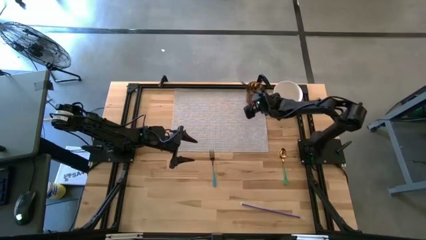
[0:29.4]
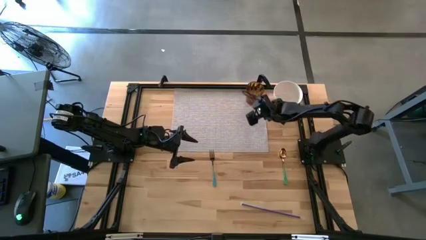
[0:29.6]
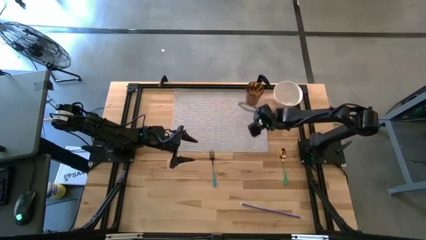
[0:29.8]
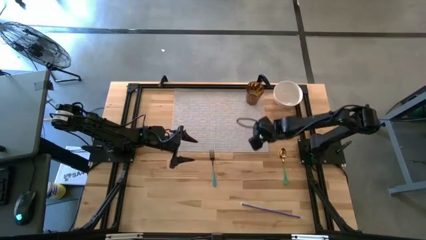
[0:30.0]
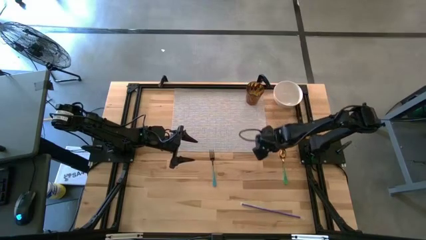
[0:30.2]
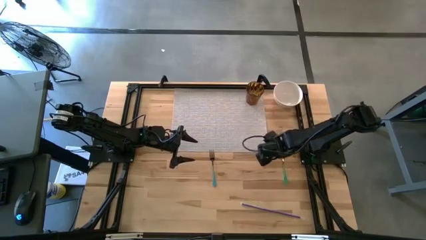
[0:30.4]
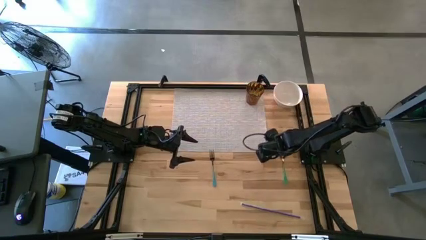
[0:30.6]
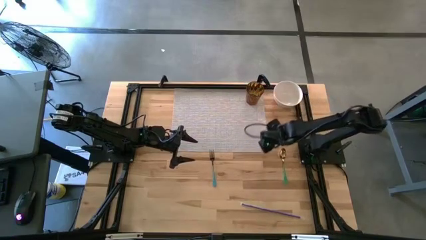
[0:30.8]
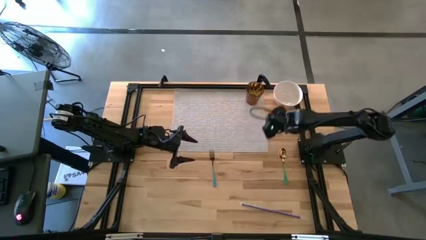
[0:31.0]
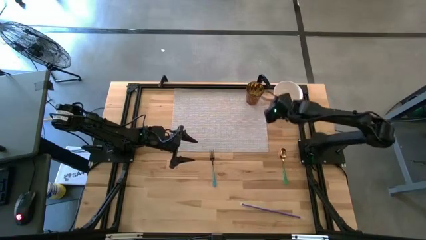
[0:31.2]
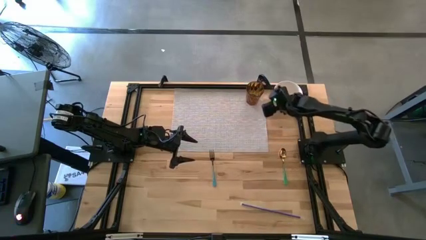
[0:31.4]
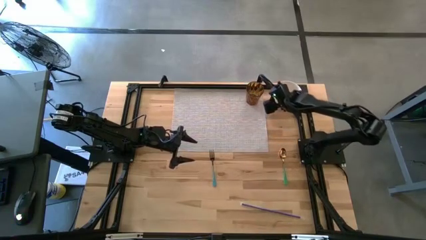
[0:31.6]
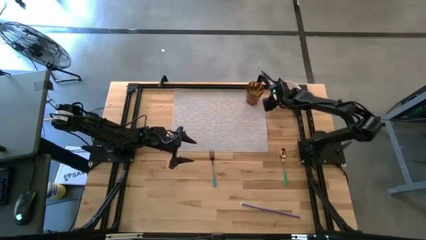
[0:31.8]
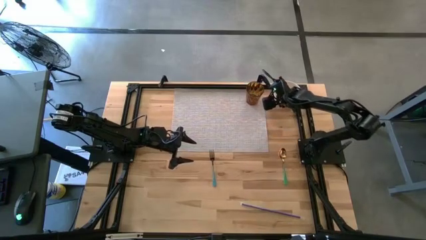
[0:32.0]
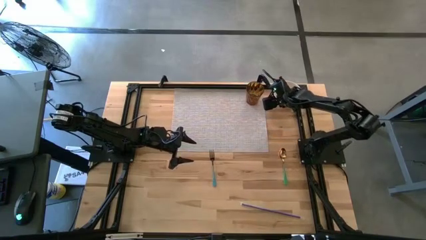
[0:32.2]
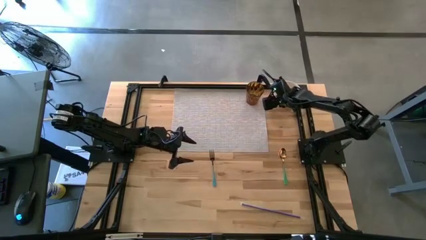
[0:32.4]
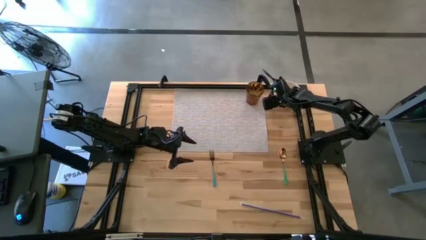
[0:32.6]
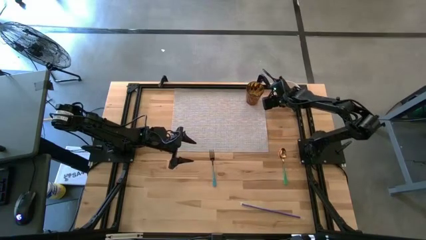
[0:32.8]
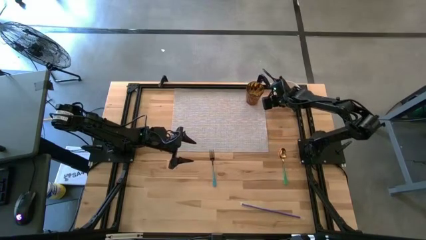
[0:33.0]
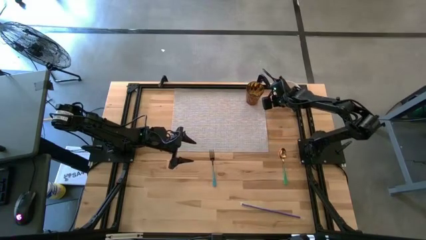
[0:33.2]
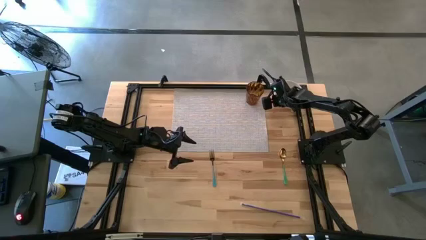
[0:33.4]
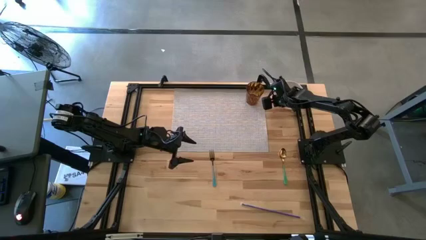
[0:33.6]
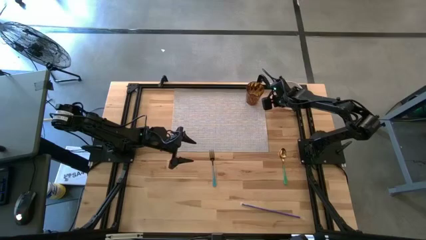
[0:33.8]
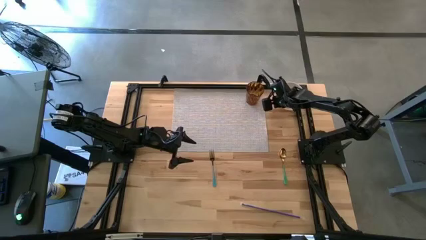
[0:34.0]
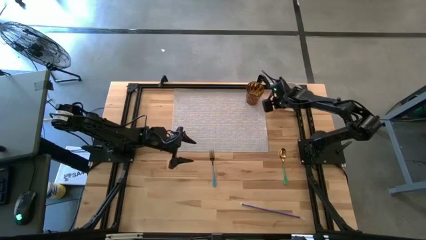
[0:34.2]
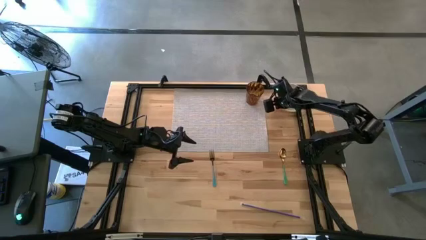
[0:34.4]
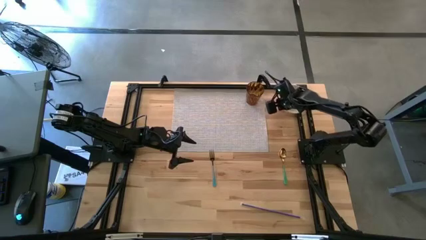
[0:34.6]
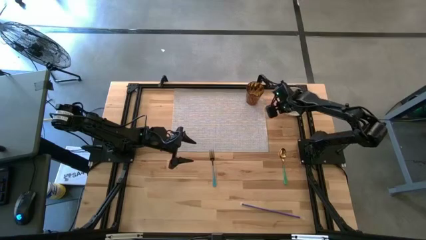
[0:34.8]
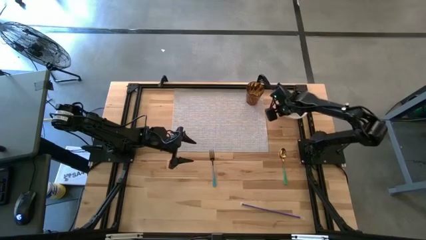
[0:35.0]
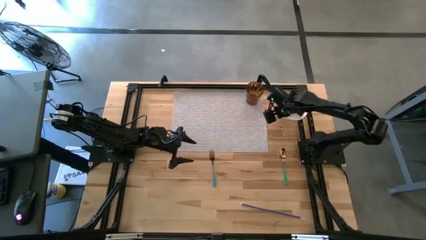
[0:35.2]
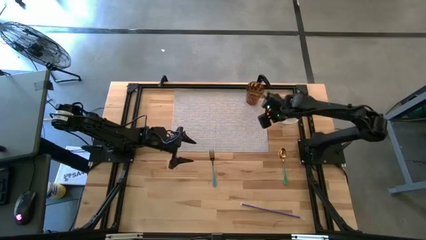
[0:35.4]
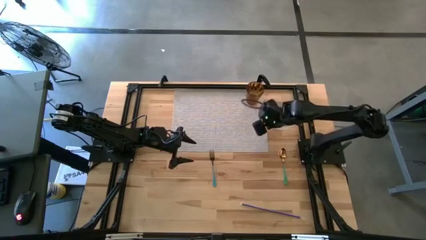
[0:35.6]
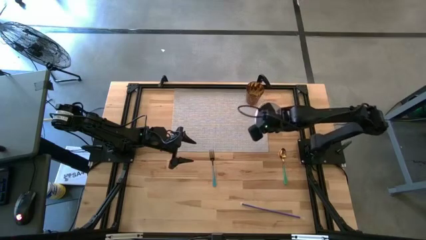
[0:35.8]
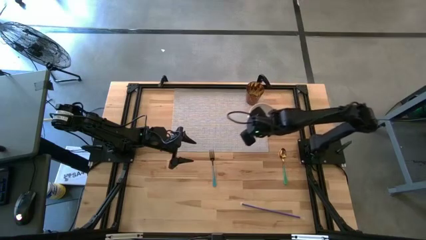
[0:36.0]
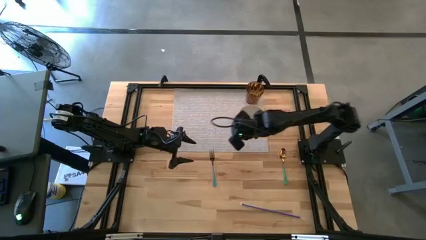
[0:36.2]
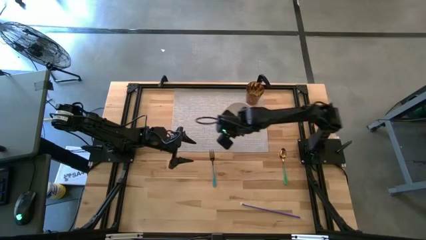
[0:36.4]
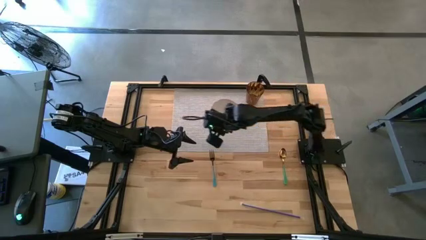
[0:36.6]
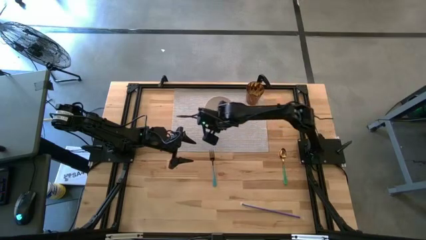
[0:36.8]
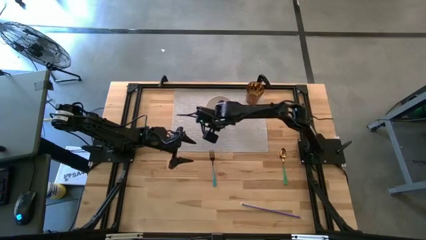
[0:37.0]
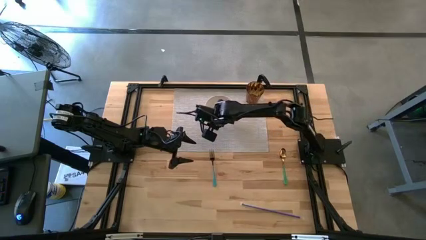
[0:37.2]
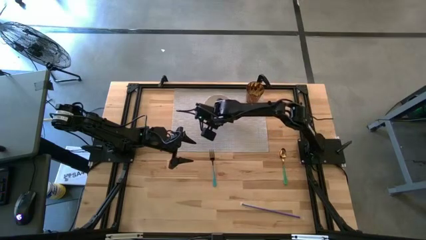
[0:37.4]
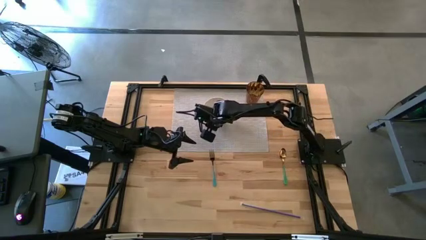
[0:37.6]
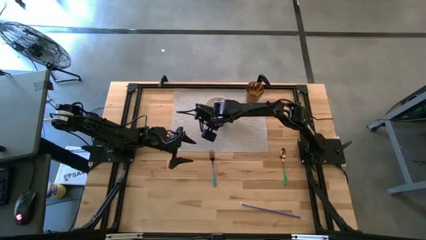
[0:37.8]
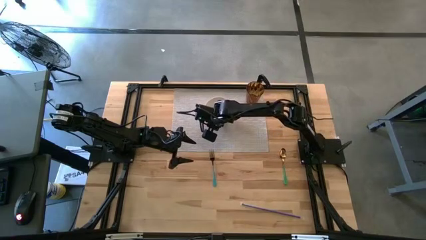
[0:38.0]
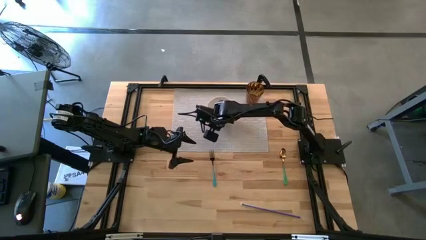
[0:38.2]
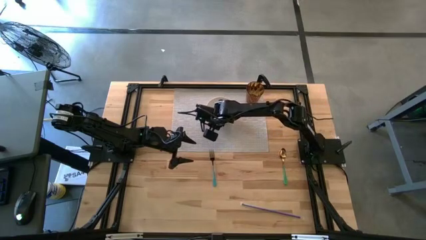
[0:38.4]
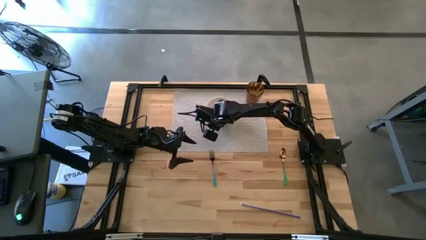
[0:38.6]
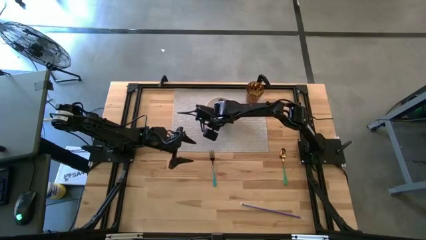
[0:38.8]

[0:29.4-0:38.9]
Task: Pick & Place Utensil
Put the white bowl to the bottom left of the brown cup on the gray mat

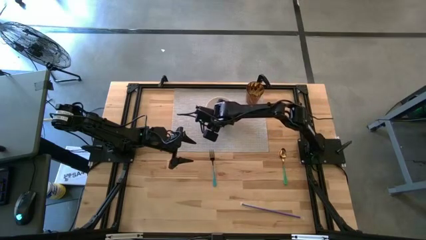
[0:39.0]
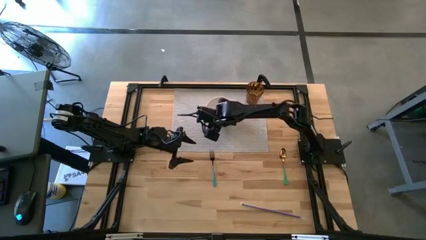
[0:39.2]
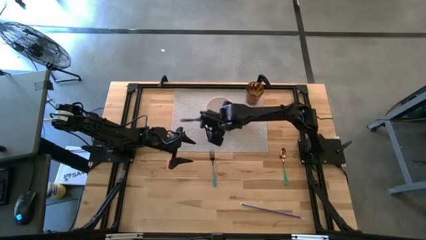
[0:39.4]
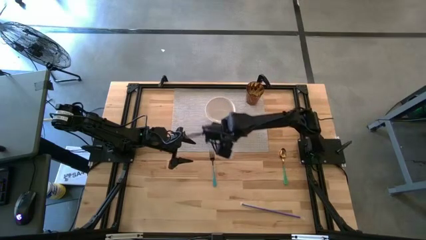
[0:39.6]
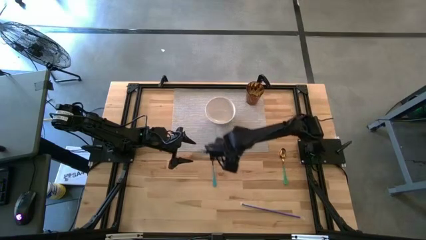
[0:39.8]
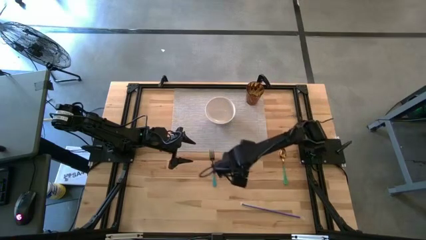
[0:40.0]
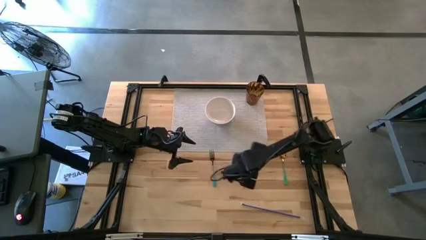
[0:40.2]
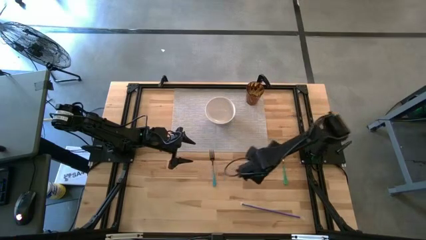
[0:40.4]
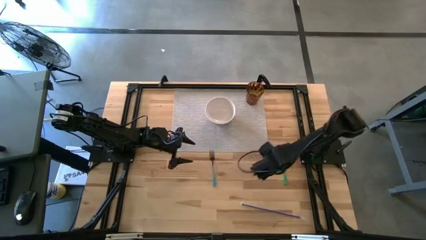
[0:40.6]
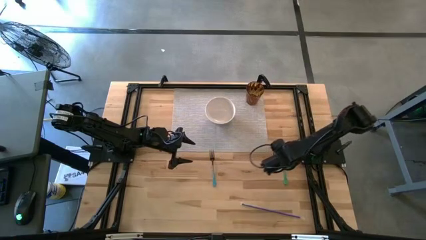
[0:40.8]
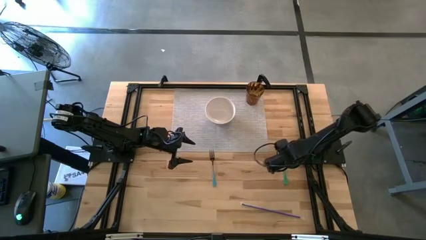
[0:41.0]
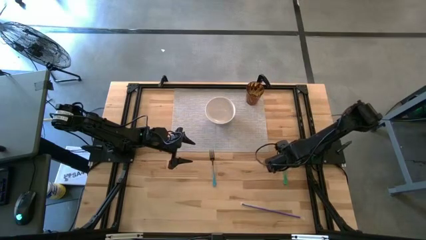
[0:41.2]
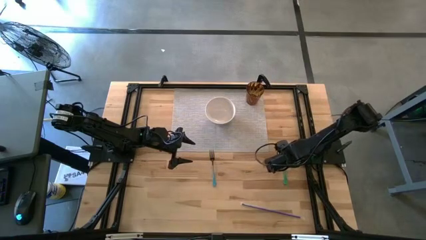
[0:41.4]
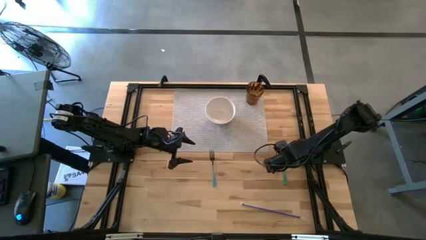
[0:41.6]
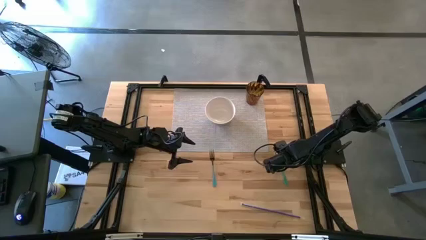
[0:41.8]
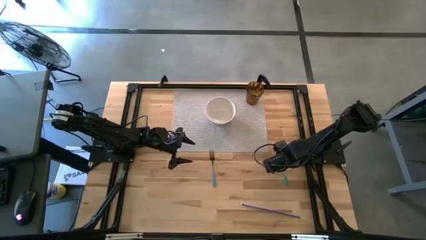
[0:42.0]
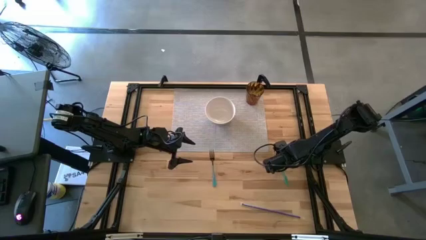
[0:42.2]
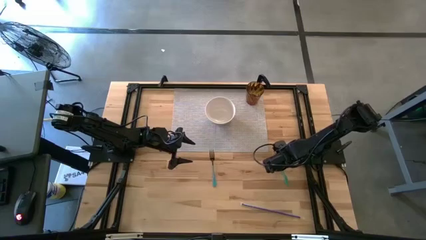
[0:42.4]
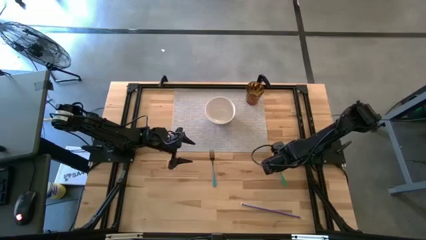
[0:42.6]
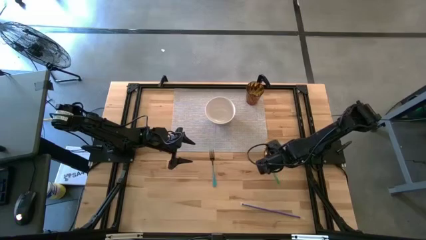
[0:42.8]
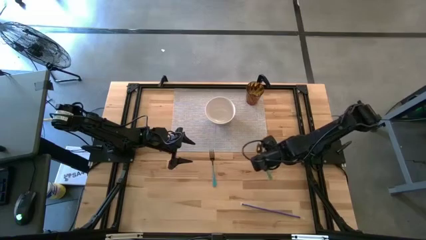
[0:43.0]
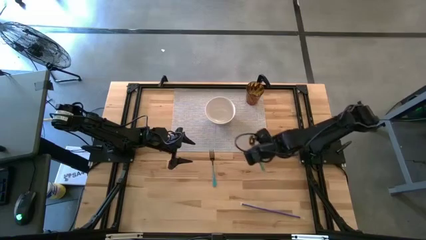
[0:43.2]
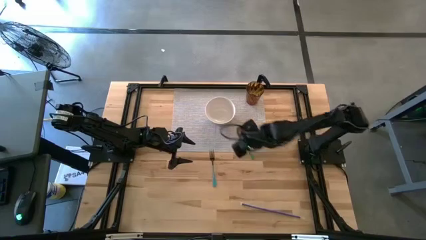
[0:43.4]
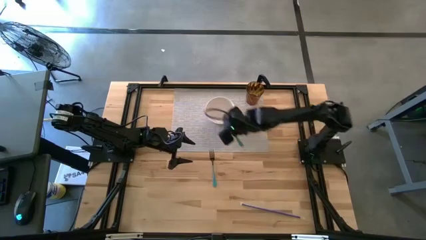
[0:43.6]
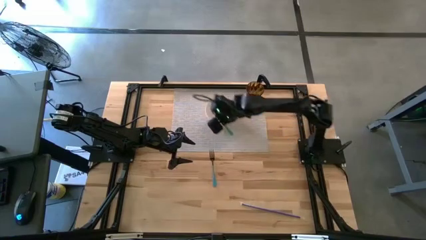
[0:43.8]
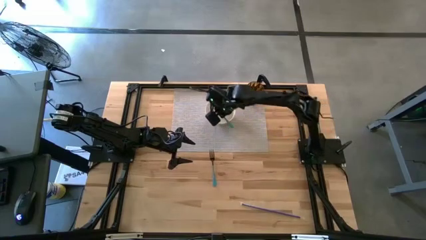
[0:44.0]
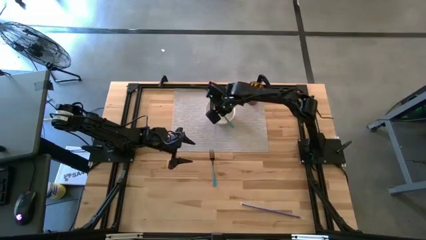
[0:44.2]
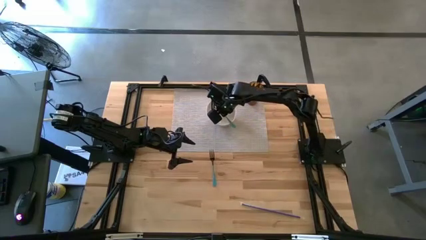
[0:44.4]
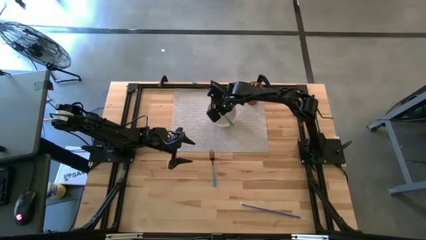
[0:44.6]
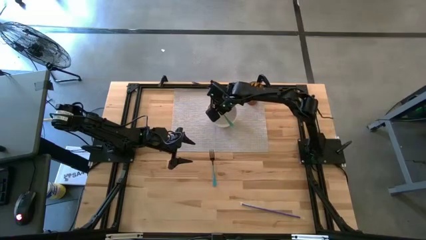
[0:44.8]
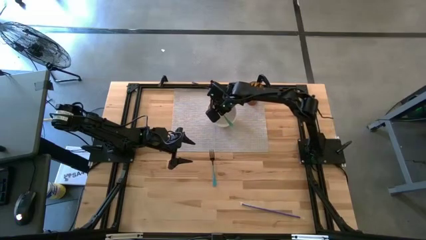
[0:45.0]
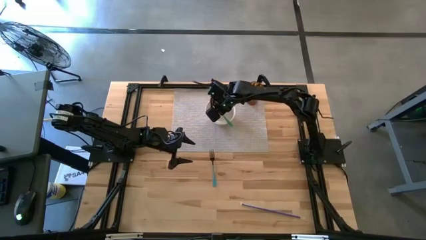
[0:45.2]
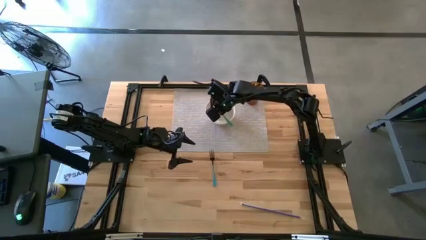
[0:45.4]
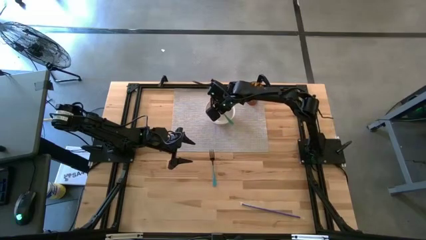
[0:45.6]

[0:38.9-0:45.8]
Put the green spoon into the white bowl on the gray mat
